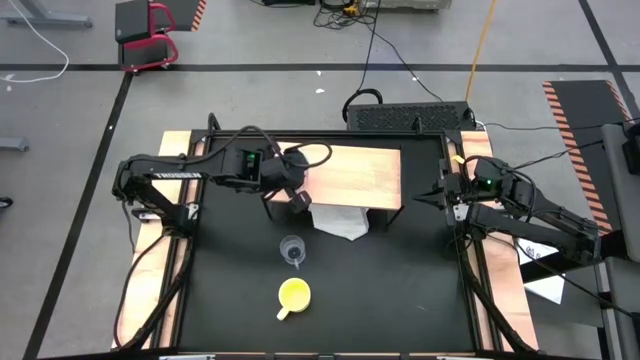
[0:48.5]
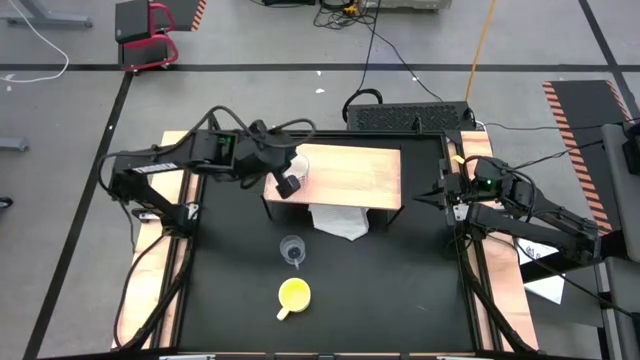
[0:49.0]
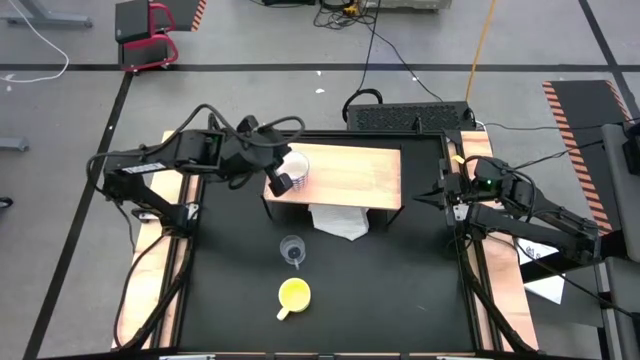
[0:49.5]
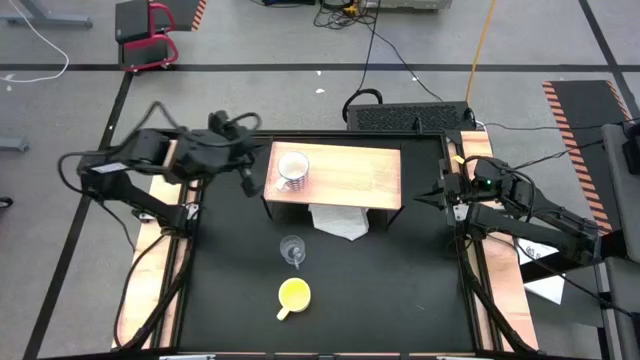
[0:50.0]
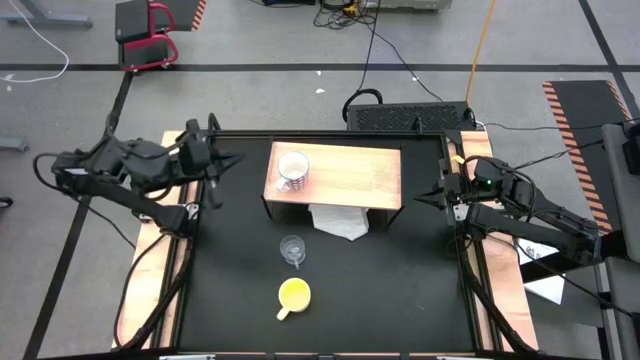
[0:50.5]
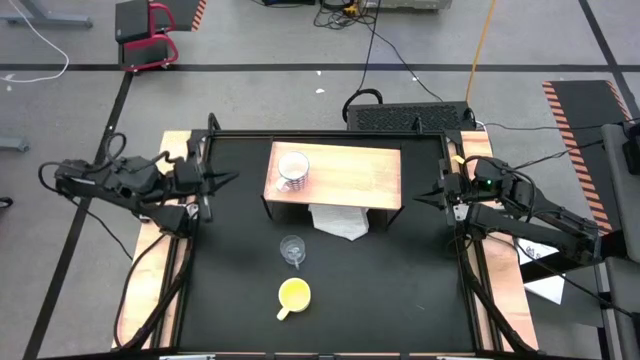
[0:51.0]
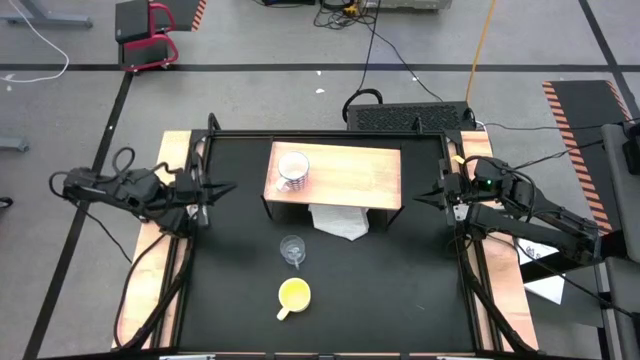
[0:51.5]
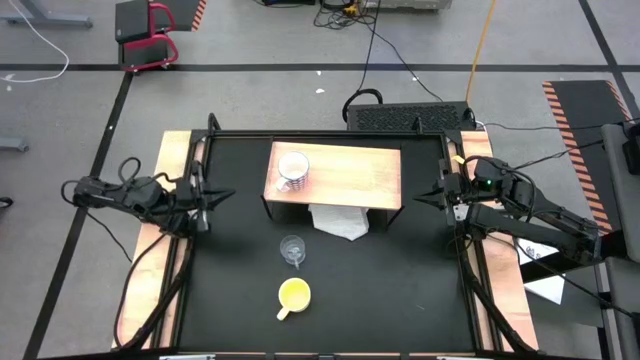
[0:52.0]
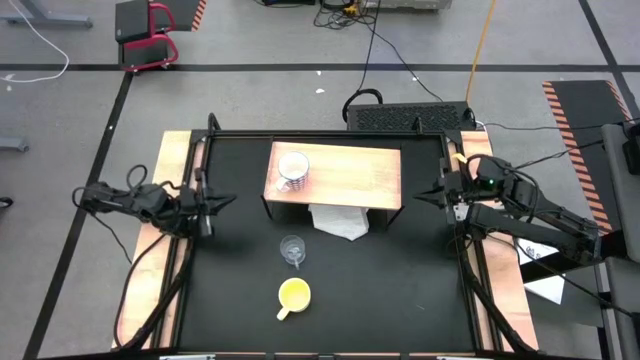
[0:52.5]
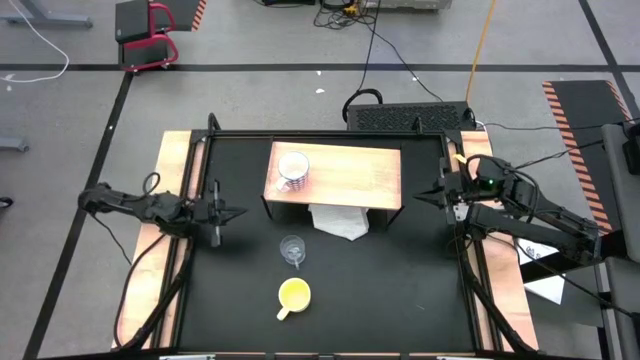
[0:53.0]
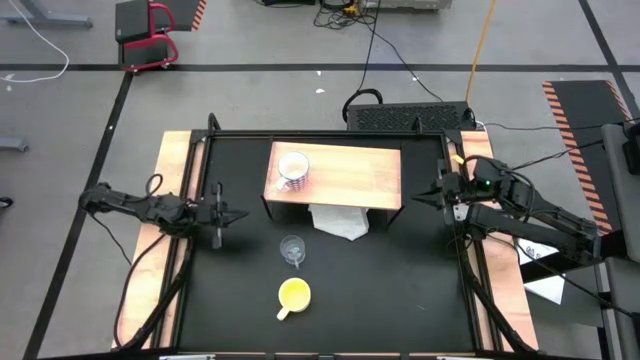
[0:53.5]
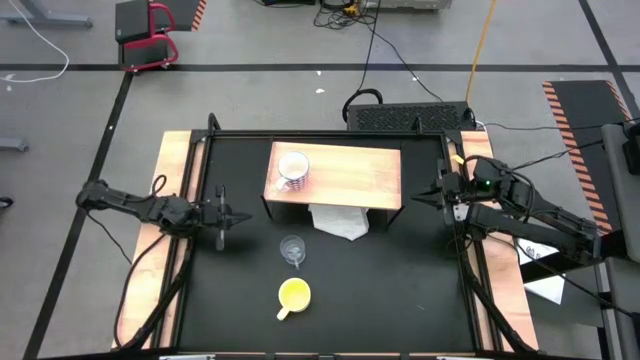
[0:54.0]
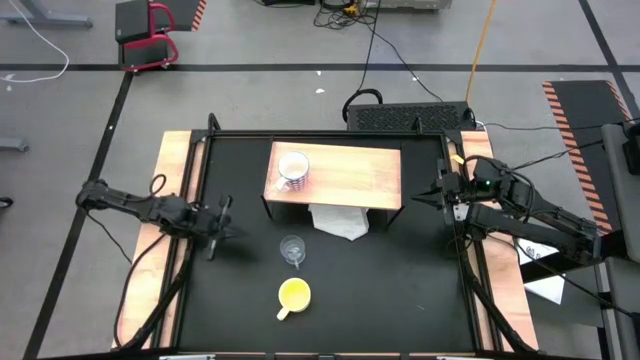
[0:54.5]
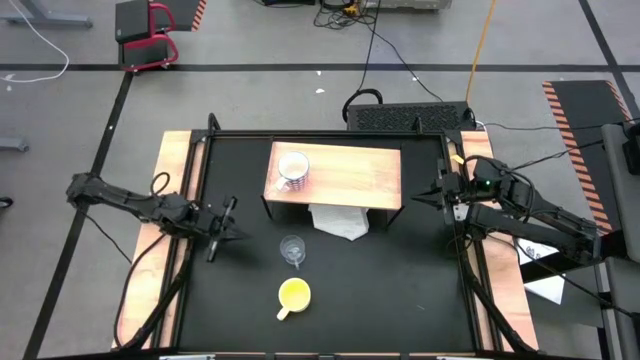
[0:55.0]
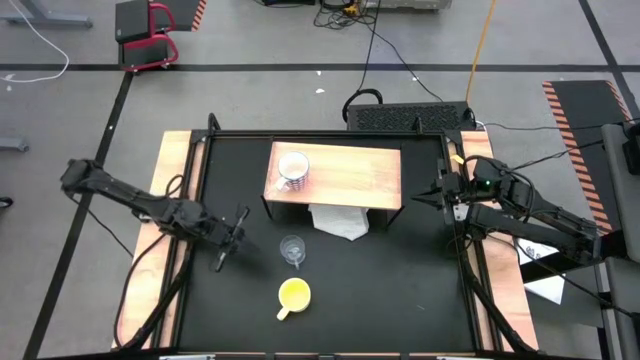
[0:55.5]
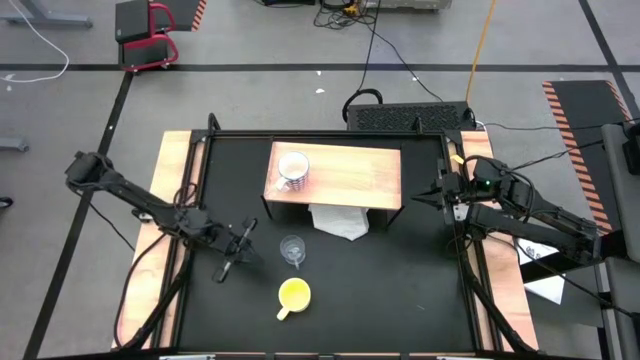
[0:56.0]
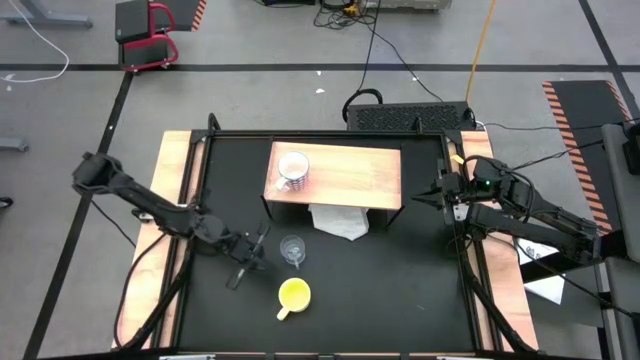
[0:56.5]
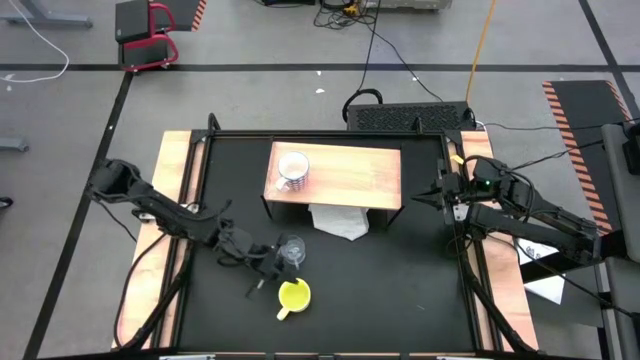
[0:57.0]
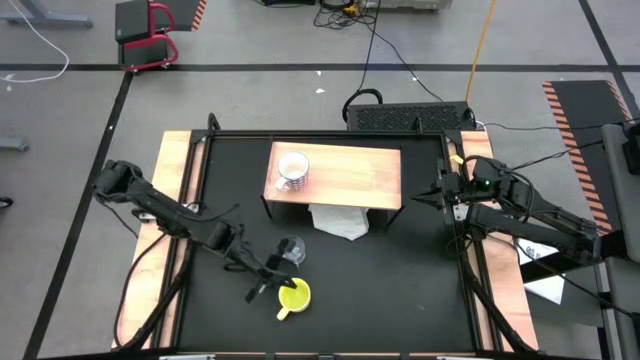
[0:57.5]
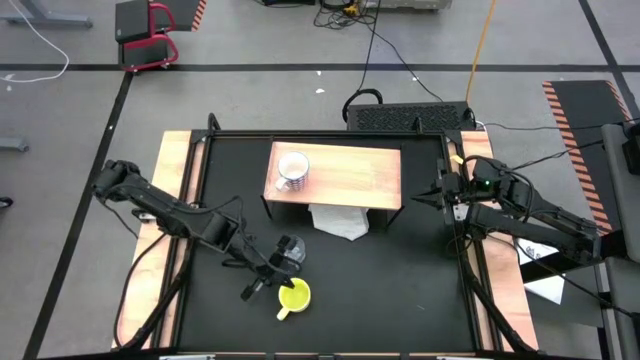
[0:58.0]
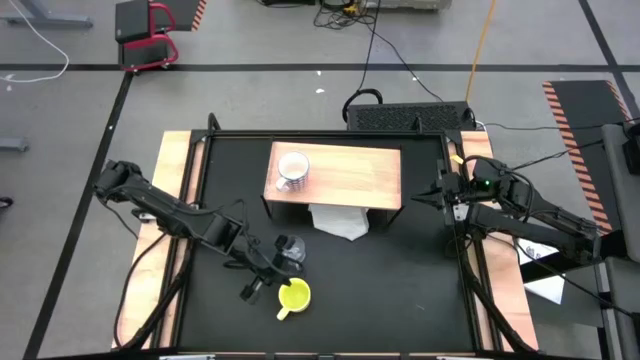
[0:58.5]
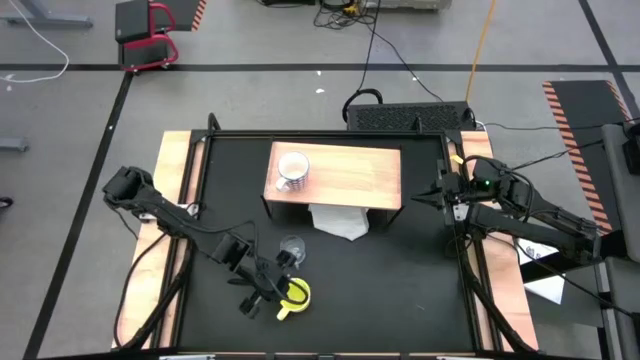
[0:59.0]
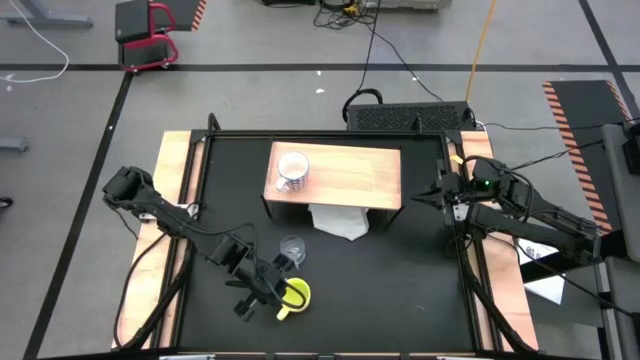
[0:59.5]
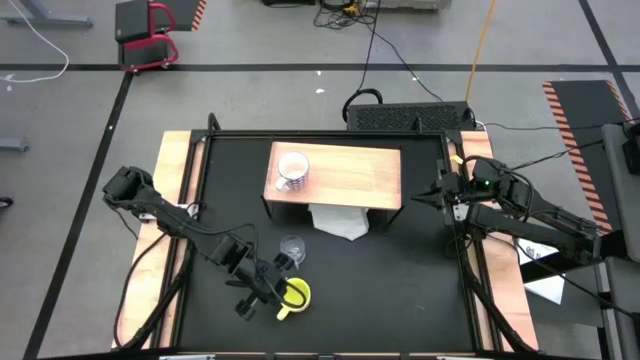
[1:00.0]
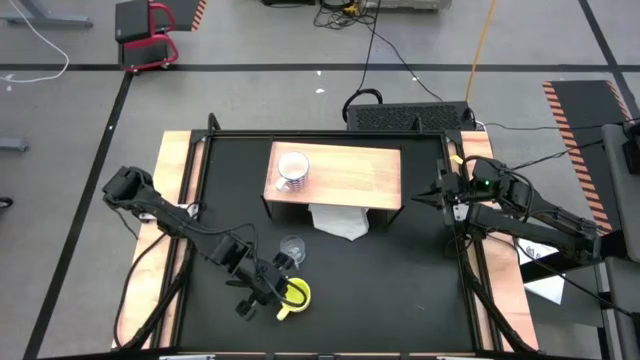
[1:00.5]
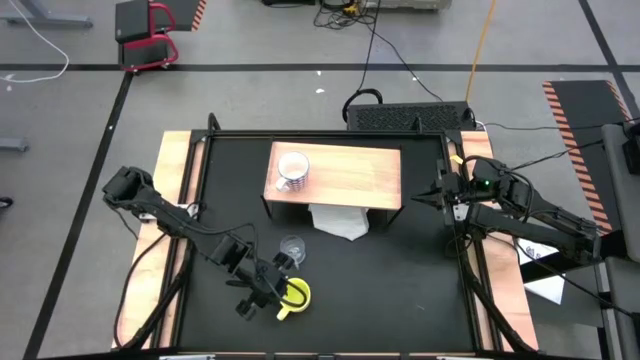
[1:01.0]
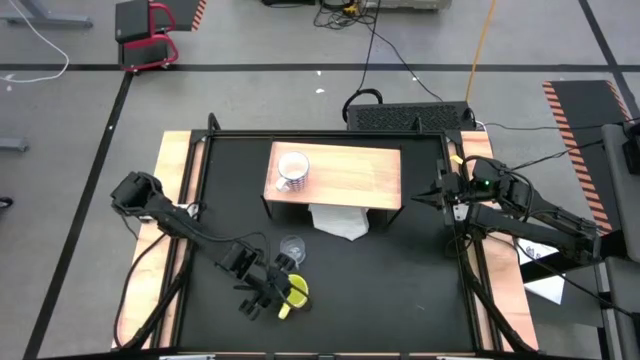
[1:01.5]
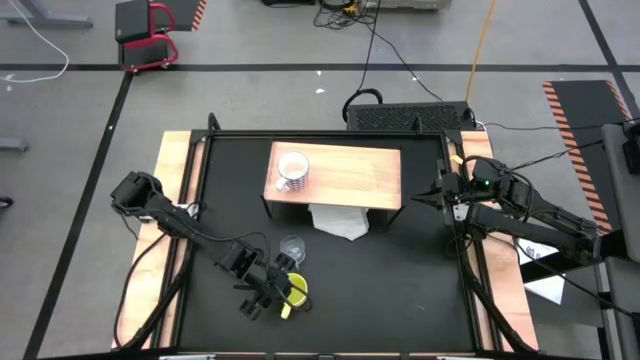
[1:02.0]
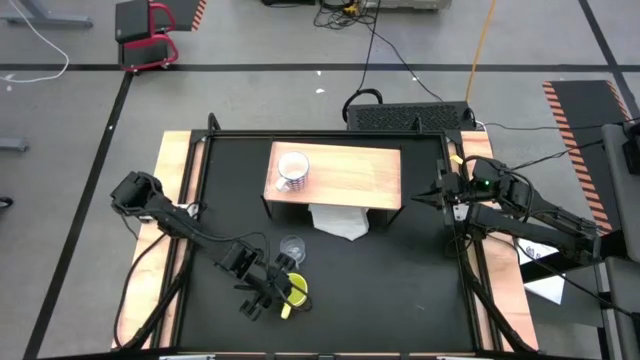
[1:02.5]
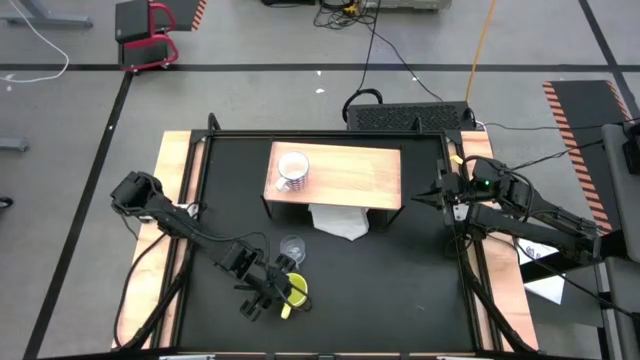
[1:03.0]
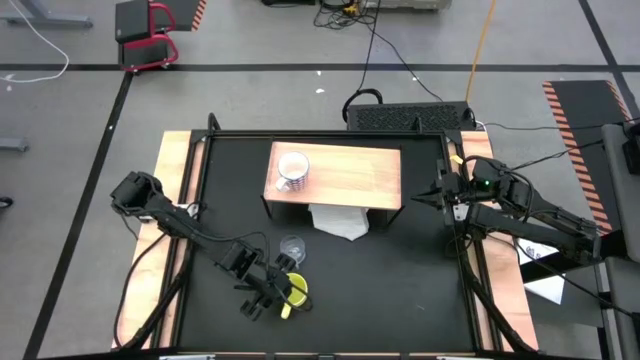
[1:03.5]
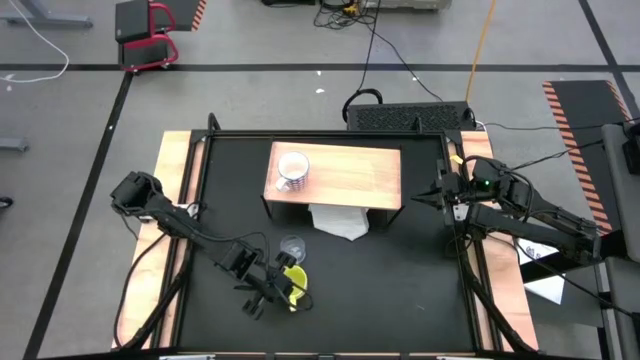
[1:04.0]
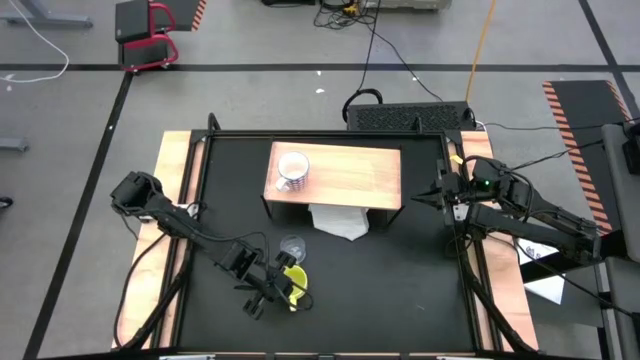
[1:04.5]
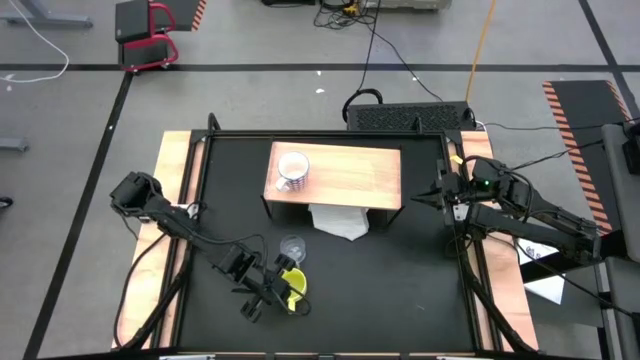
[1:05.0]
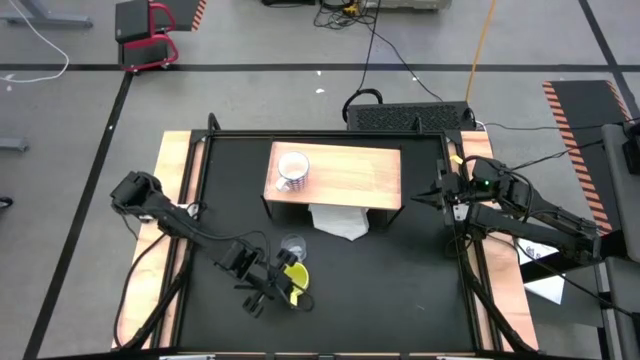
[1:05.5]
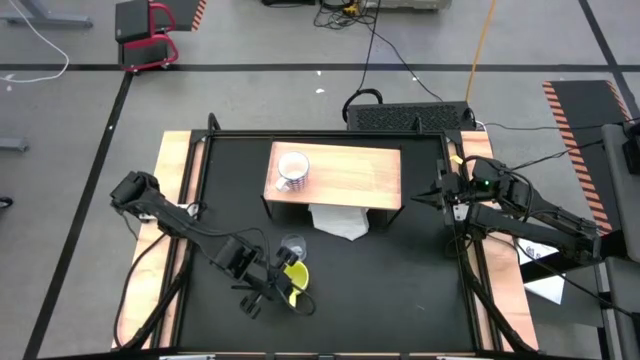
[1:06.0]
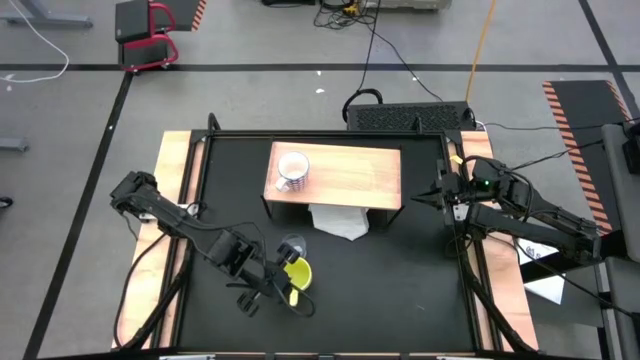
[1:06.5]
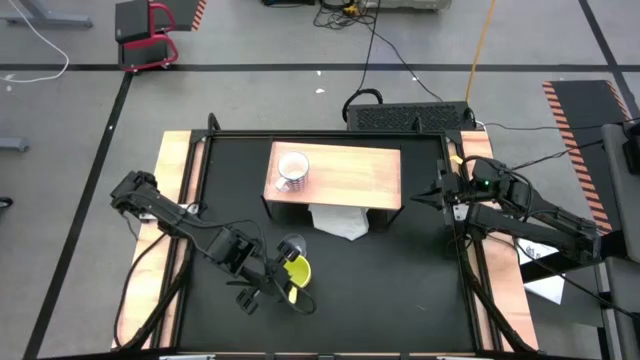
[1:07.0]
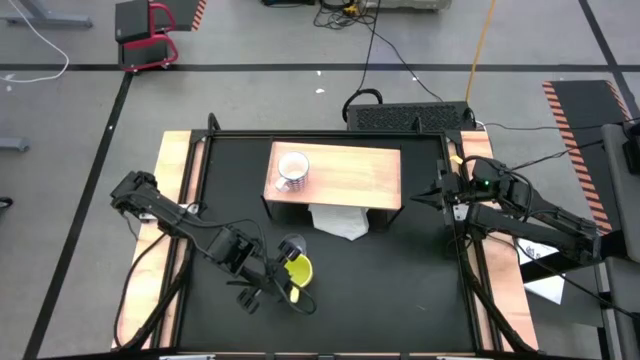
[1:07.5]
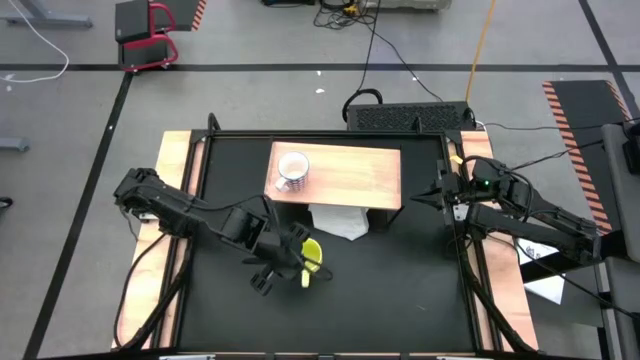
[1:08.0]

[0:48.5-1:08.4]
Task: Stack small to large cups/mugs on shelf
Put the yellow mug on the shelf
